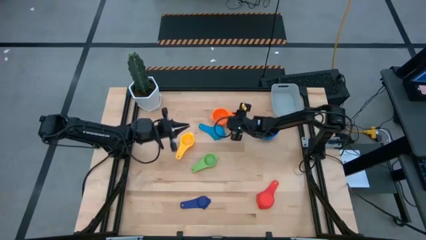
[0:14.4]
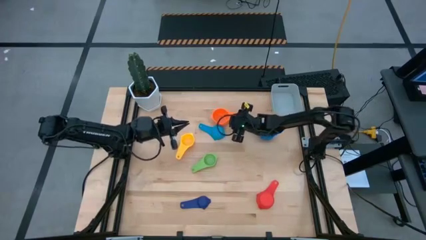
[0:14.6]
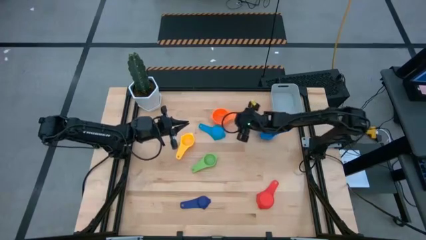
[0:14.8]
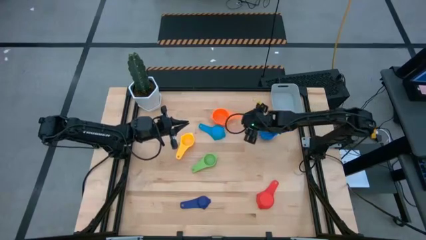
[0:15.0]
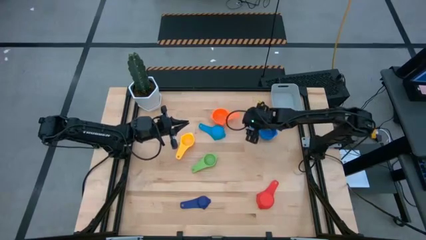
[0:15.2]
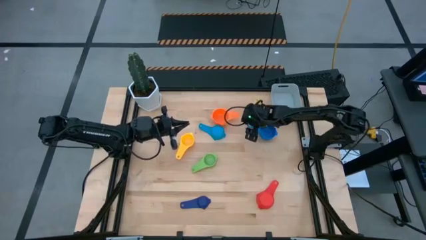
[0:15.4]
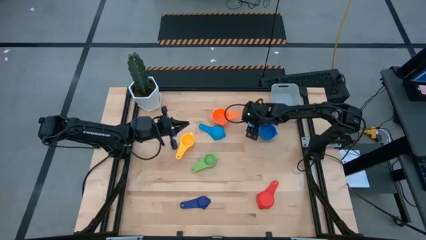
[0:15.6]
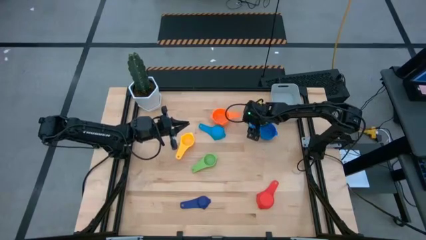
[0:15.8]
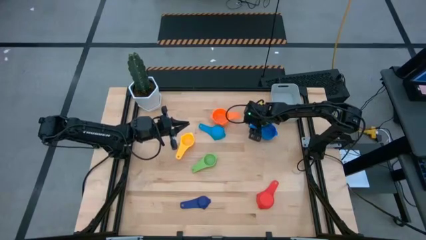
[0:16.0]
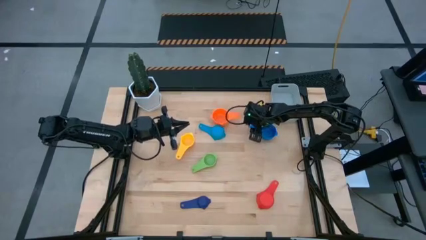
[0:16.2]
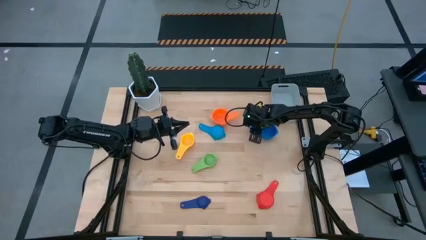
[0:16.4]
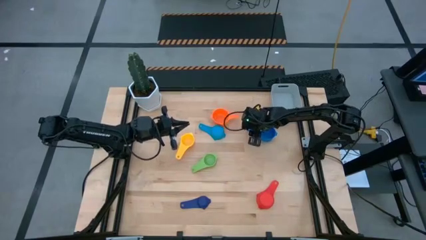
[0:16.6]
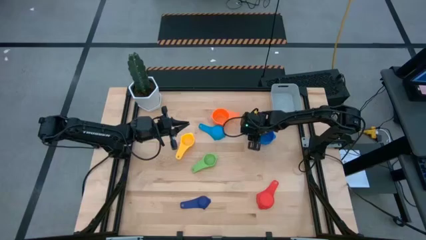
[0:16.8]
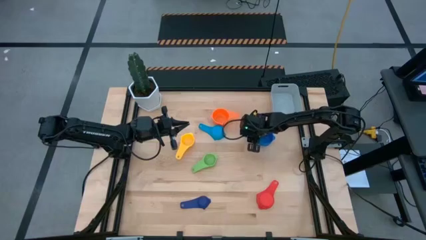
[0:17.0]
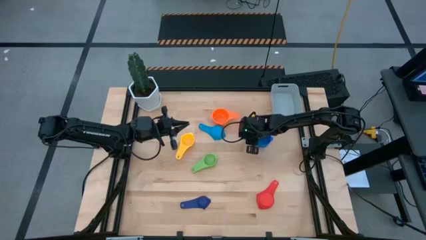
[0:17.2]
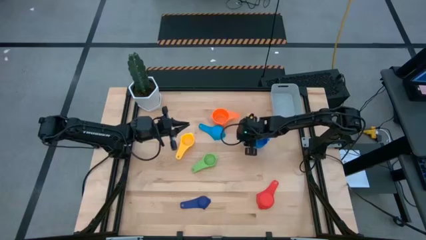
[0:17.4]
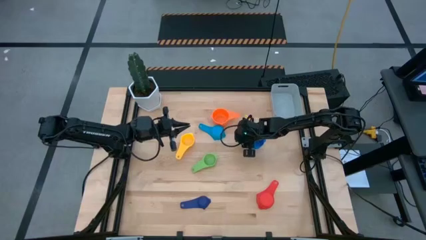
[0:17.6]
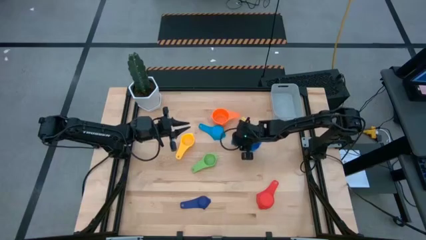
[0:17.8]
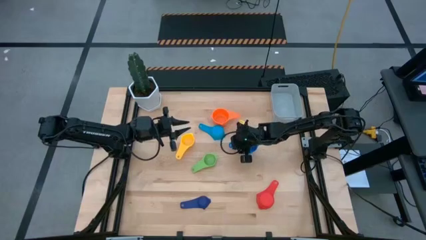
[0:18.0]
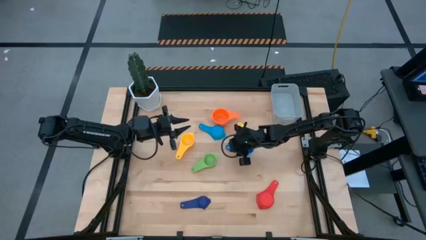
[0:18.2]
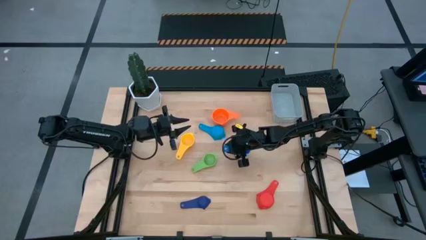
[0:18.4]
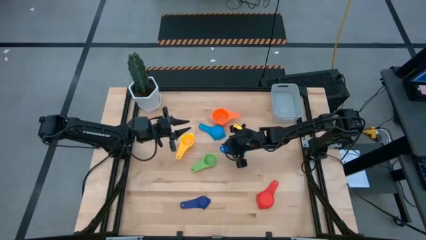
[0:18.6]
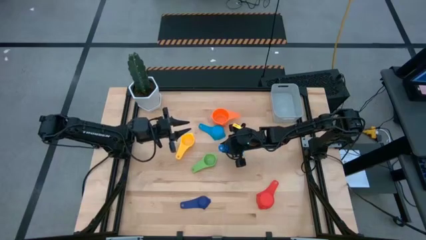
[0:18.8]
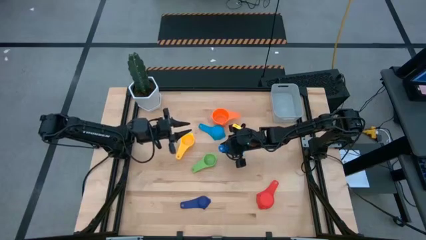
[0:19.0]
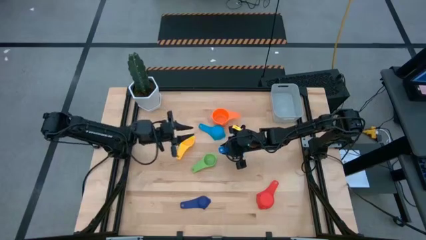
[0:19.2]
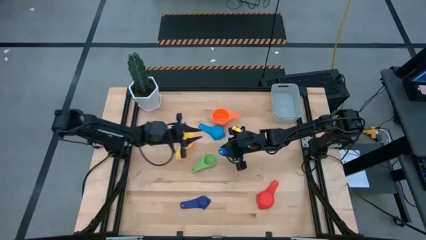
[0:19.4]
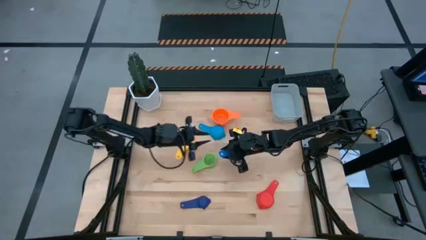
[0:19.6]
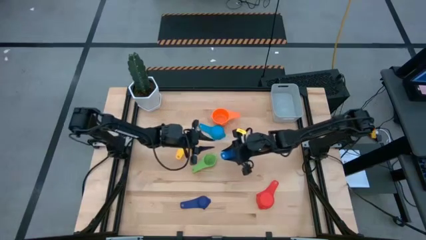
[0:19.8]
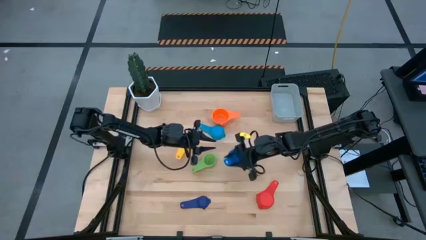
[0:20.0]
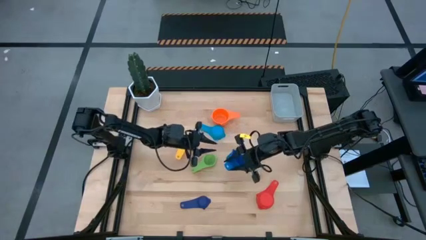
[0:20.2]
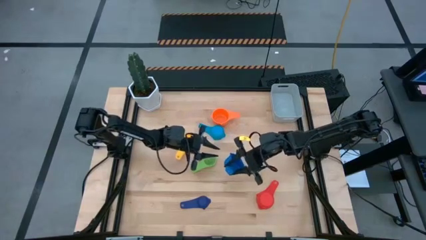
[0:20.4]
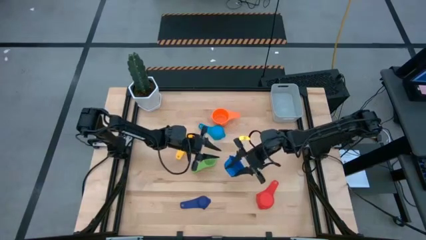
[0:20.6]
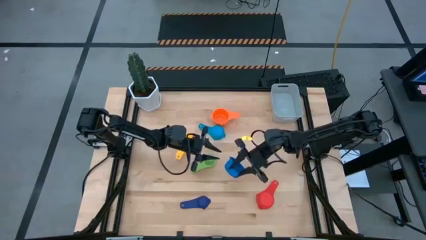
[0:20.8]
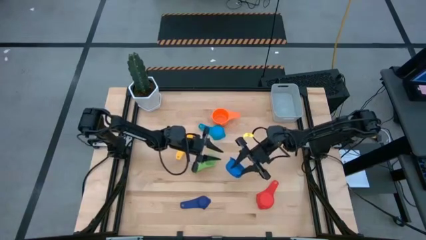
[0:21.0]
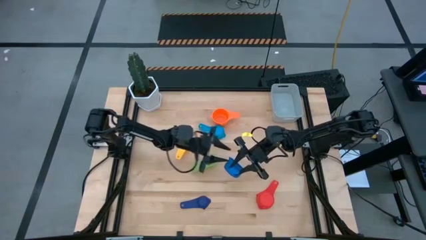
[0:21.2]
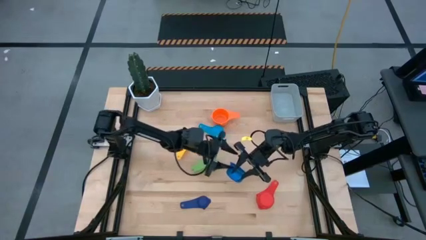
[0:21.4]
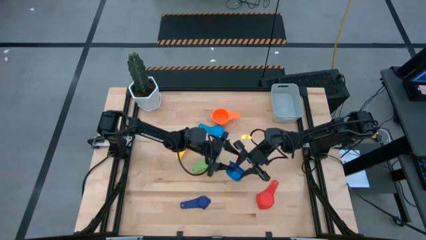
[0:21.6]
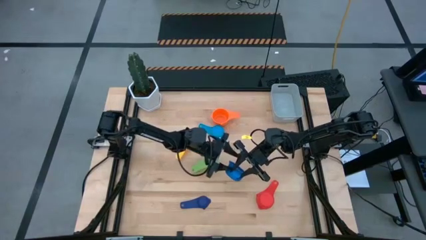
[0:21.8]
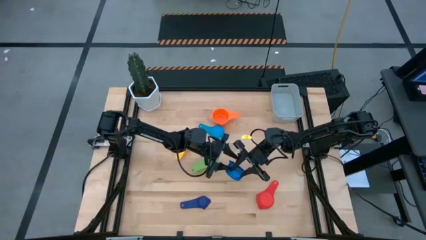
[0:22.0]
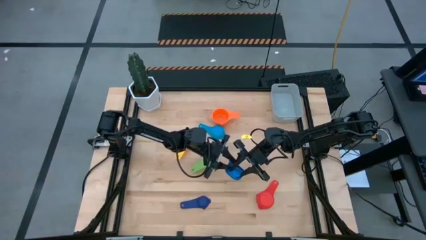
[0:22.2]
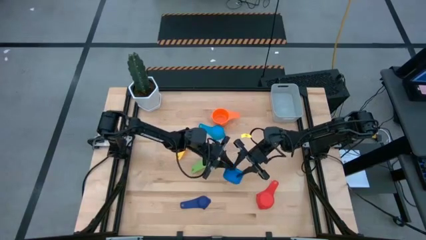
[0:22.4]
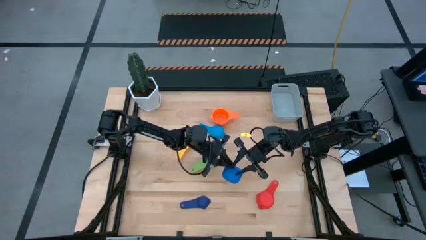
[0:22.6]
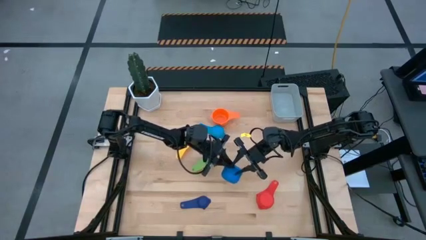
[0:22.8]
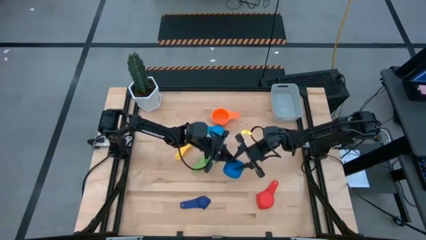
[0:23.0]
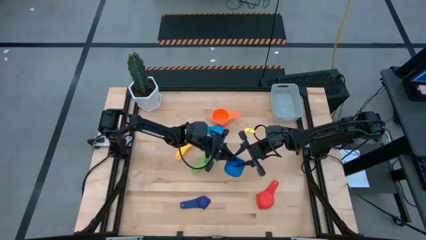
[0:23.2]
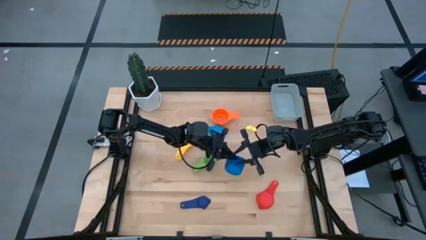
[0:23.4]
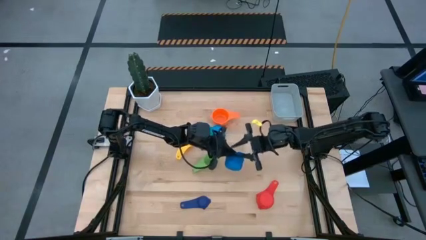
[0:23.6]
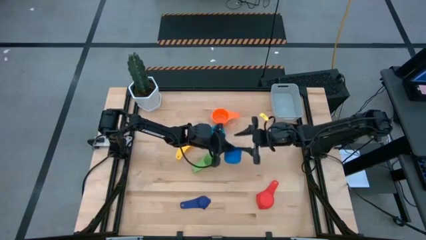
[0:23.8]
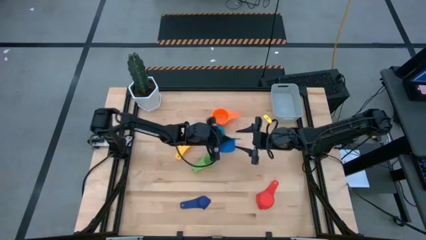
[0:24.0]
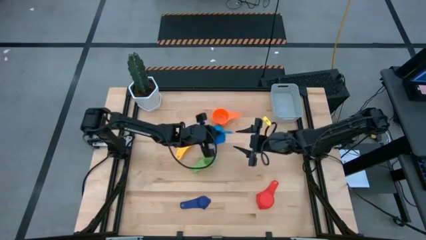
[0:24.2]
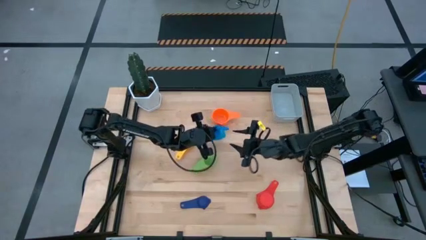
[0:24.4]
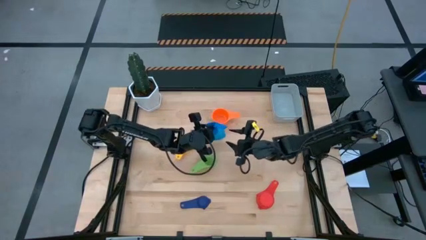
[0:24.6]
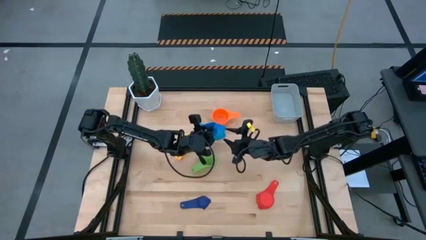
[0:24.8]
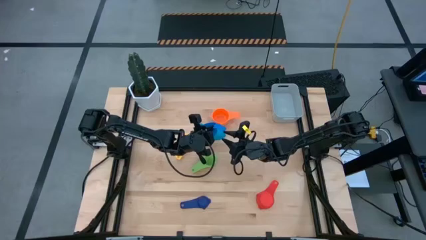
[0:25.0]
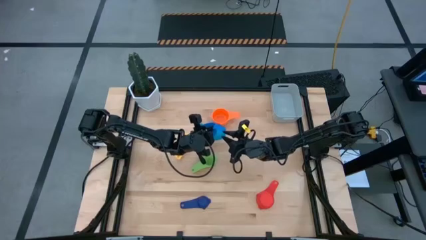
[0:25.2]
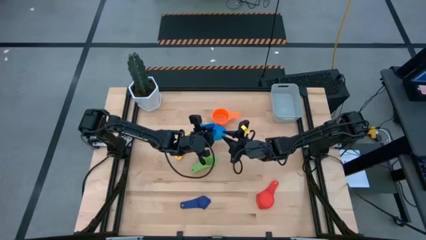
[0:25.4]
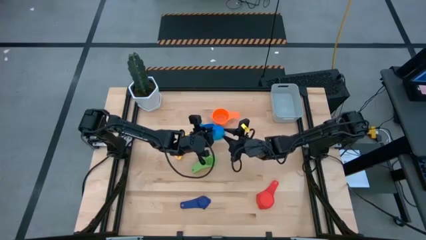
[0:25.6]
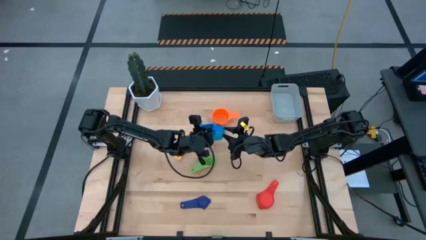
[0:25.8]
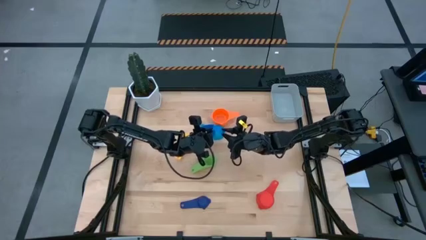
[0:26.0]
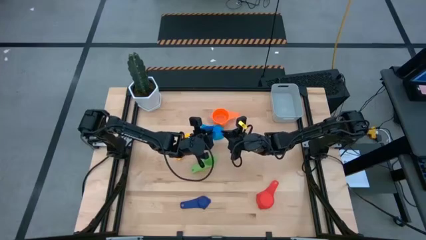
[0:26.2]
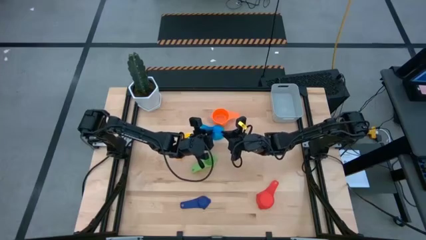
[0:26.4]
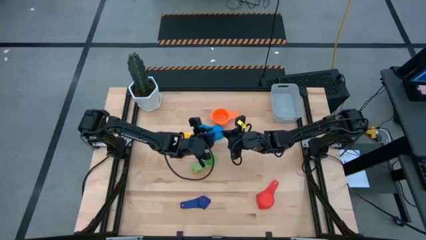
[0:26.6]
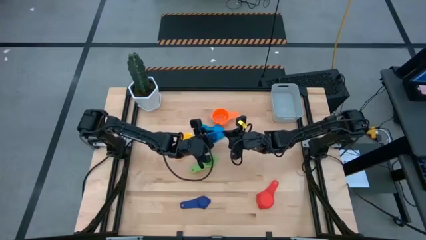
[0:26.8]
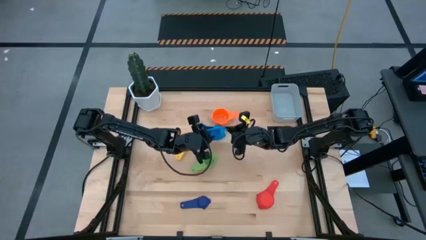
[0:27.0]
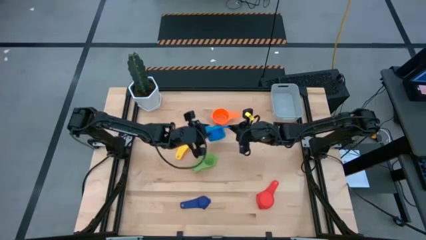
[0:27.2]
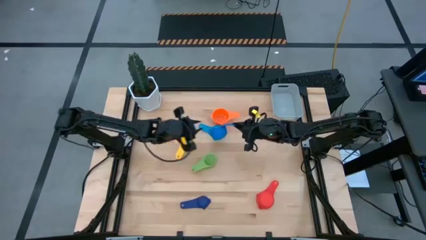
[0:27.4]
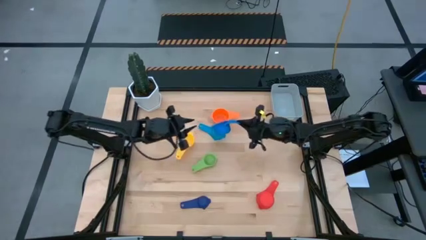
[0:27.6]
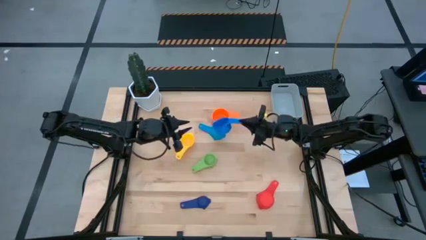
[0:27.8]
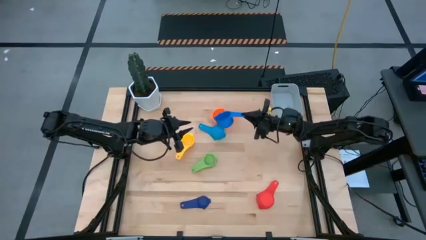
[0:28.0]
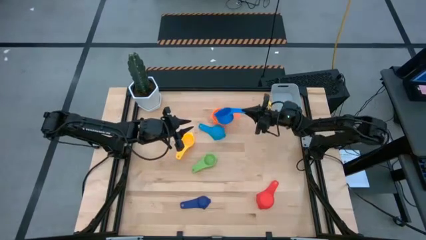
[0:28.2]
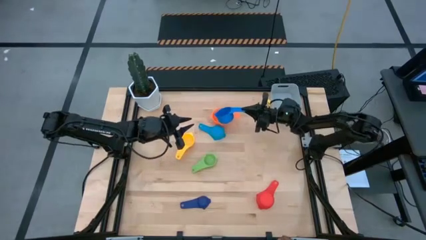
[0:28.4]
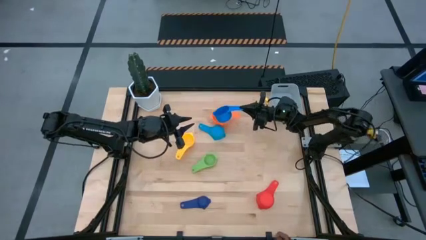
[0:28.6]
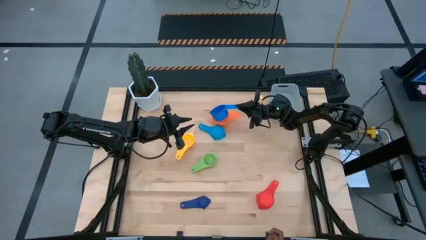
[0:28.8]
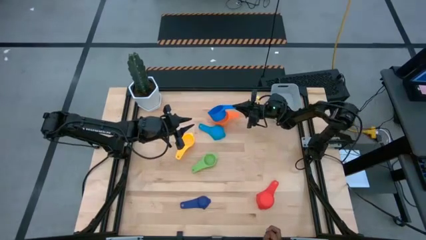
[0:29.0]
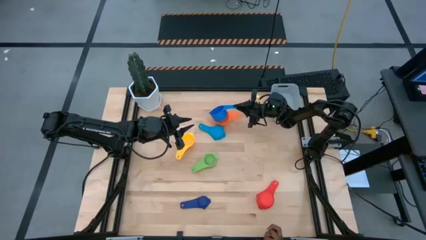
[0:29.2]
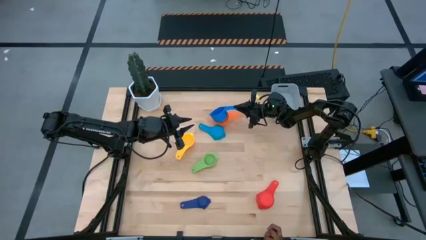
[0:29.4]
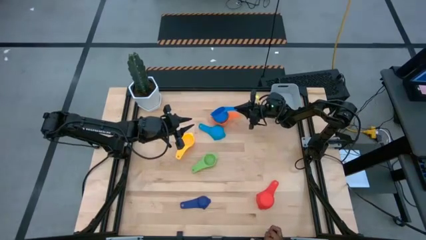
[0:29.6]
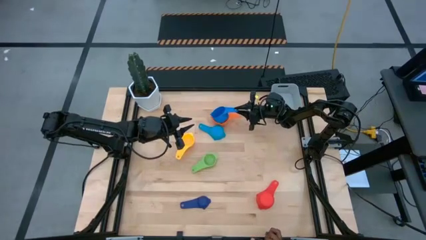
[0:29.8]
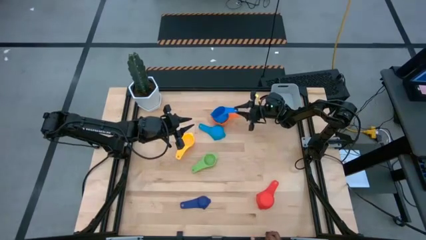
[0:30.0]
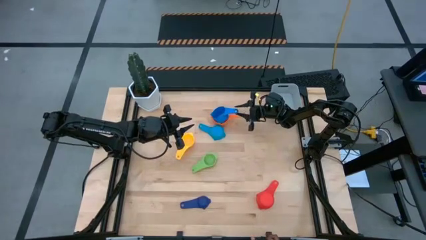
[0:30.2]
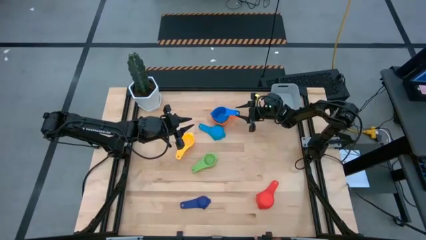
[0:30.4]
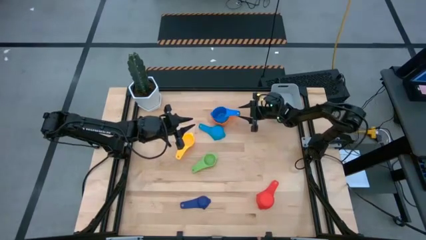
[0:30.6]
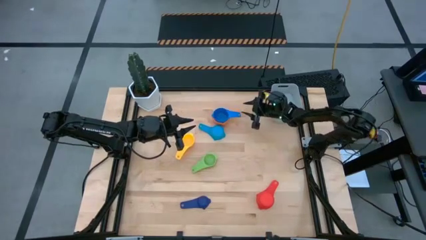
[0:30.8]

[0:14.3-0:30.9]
Task: Nest measuring cups in basket
Stack the blue measuring cup on top of the orange measuring cup
